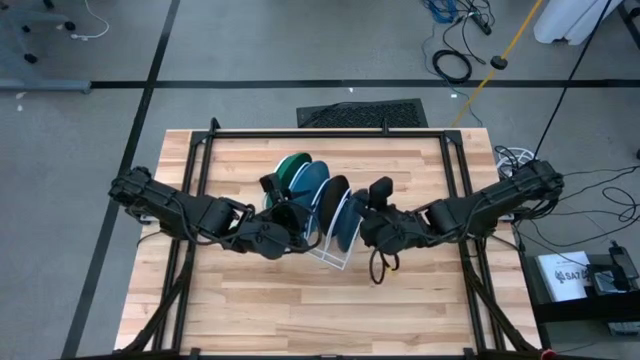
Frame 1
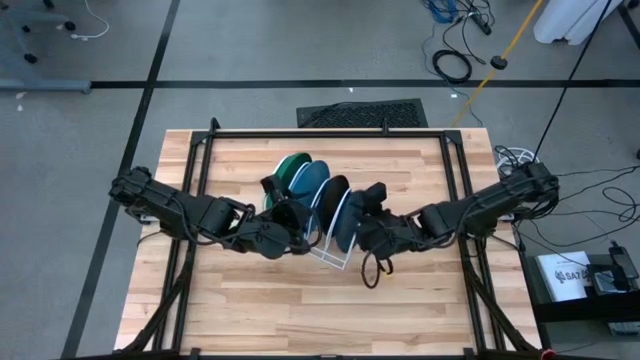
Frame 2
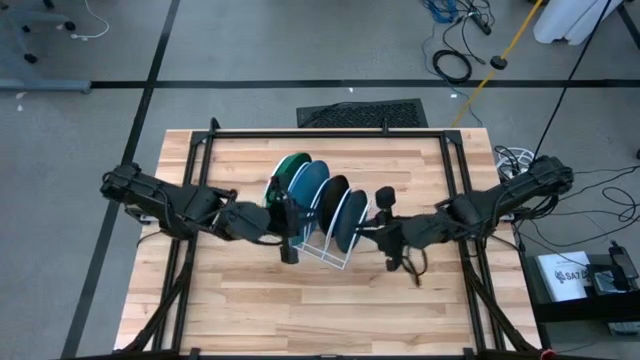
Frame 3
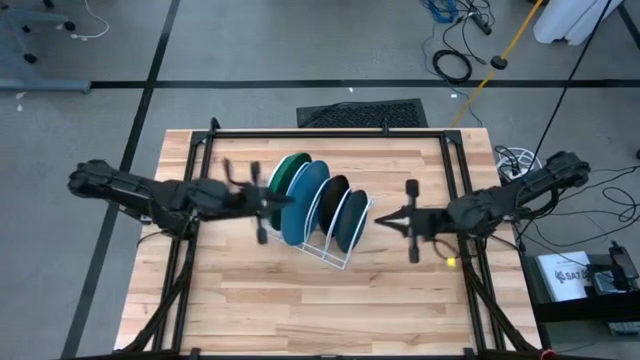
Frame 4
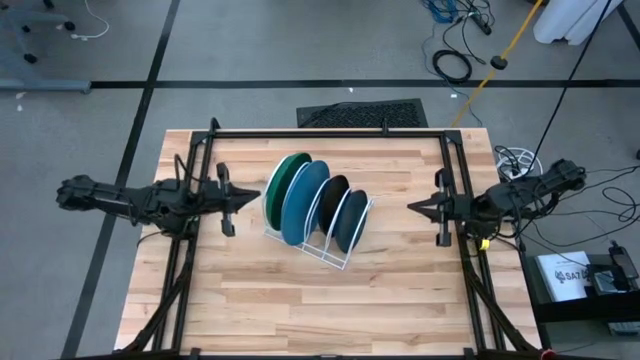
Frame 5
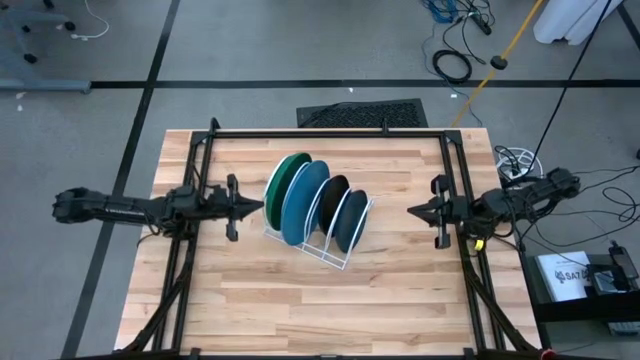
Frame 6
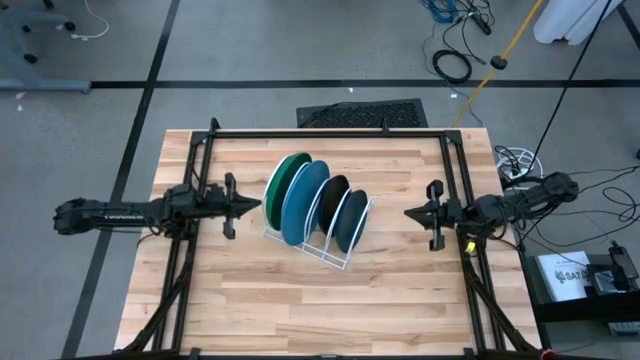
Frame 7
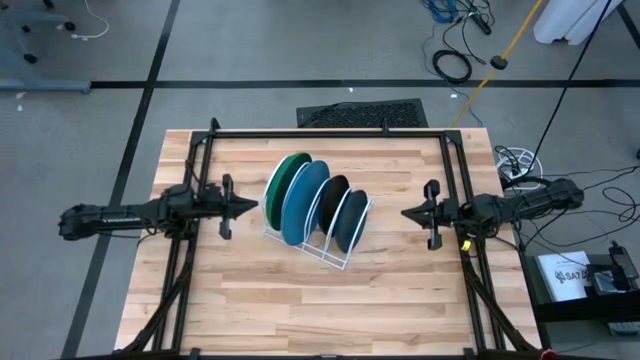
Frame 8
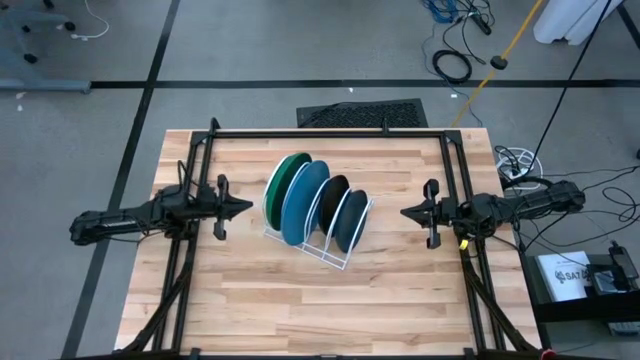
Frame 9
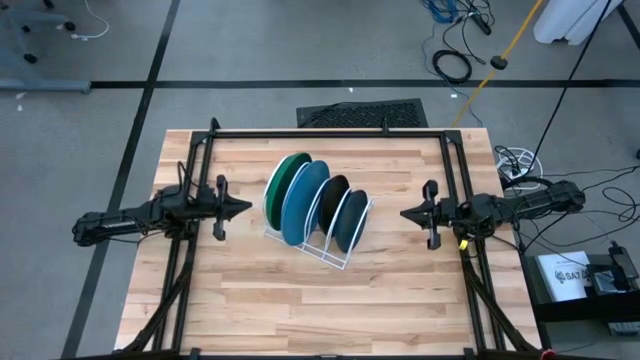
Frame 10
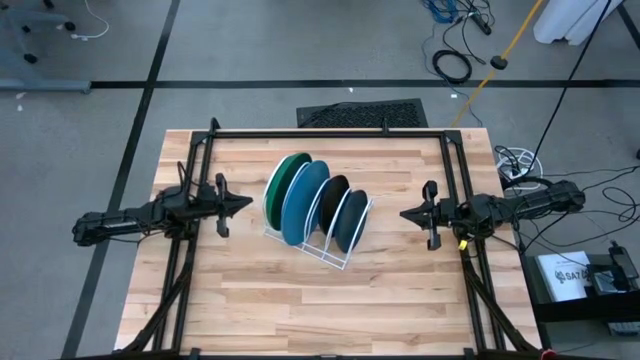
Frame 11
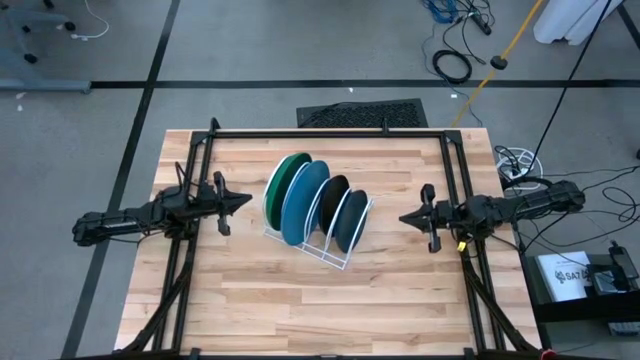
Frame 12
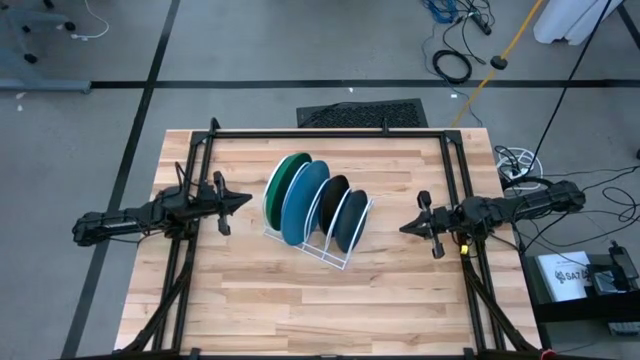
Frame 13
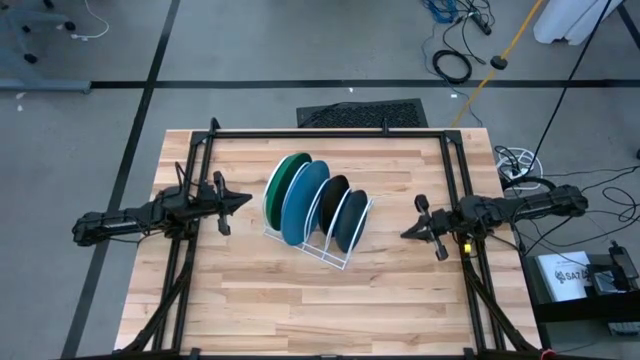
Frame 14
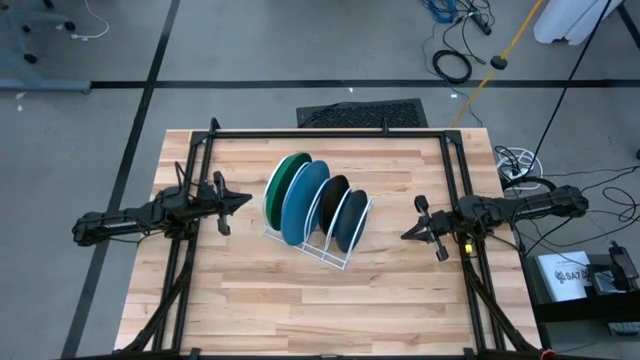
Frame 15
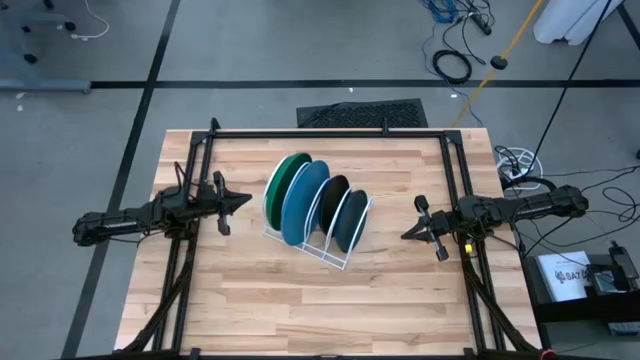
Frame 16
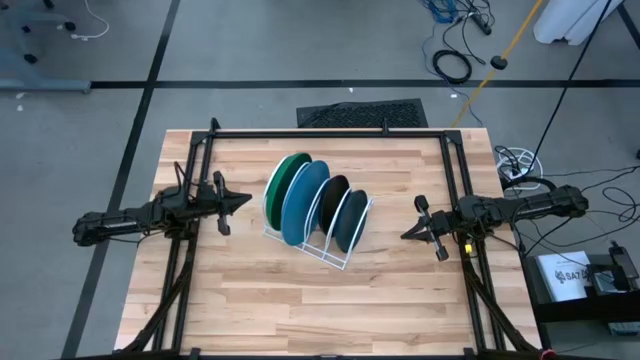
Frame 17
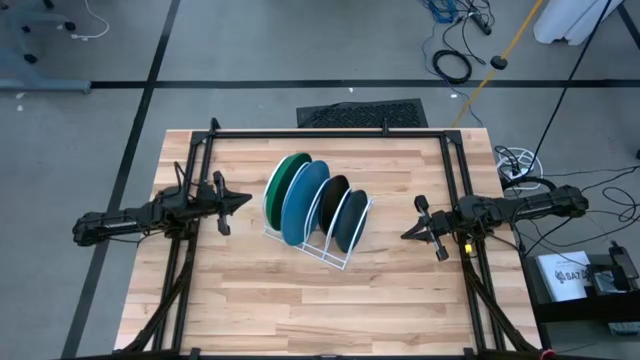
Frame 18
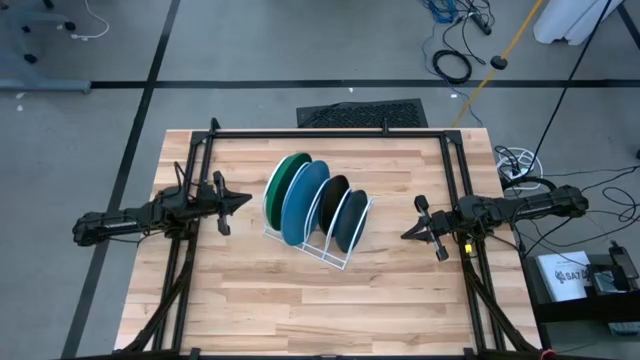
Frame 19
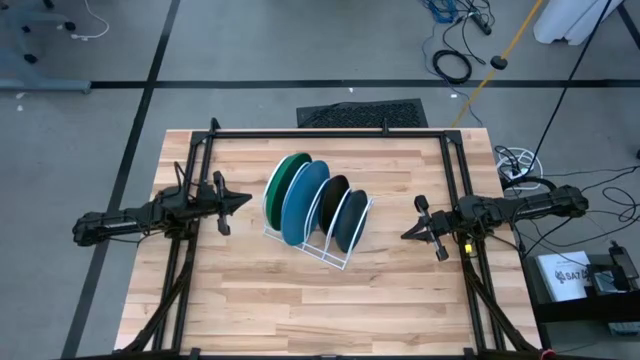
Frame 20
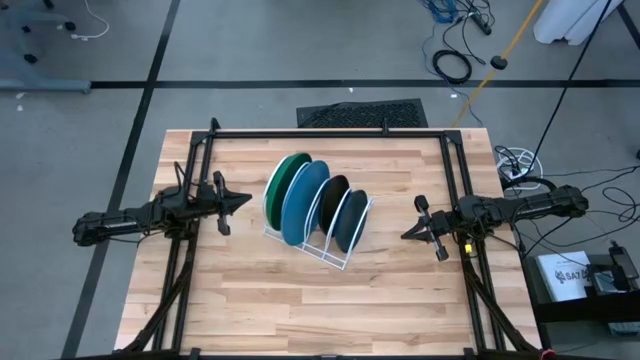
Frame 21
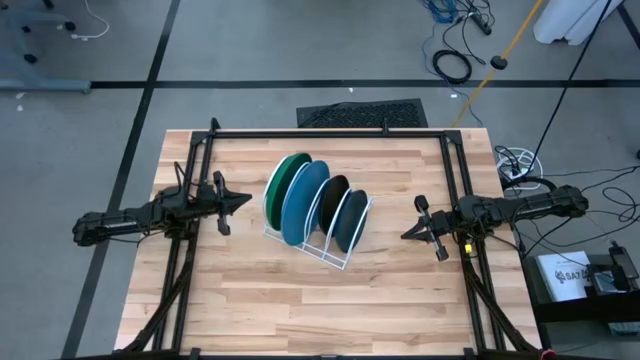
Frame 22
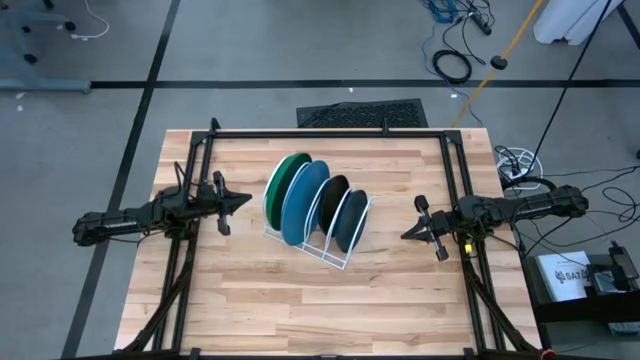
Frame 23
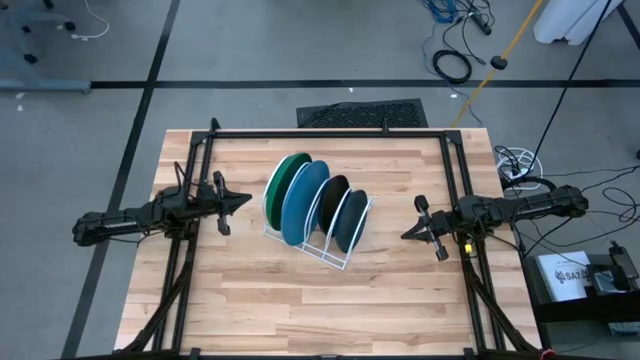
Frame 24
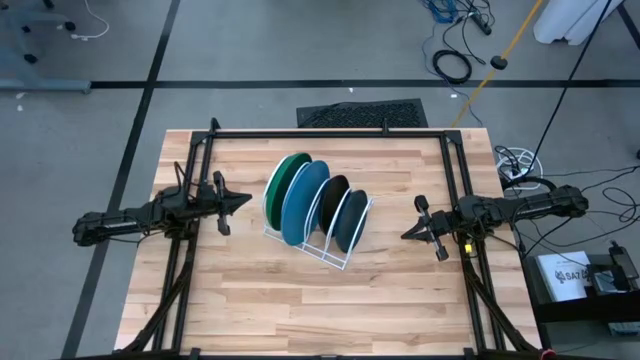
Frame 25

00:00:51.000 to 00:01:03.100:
Task: Sort dishes
Return to Home Position

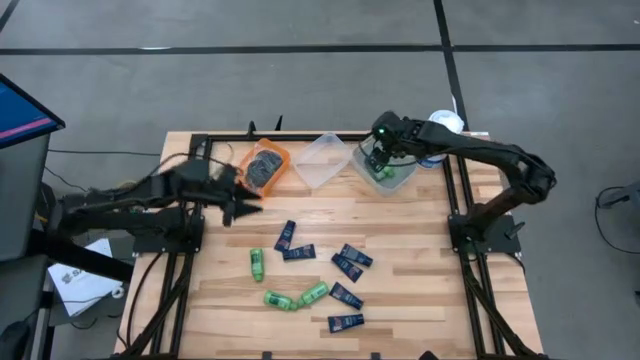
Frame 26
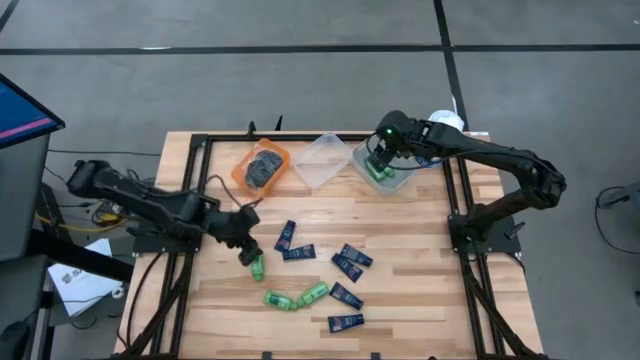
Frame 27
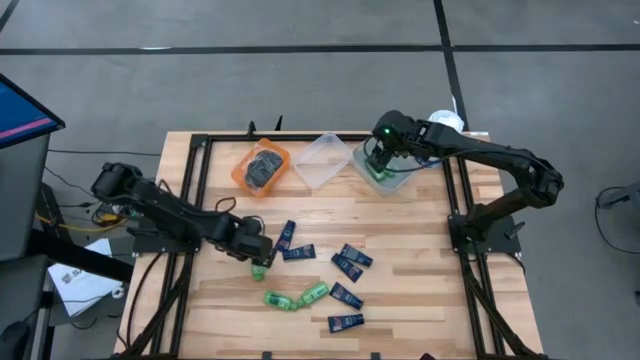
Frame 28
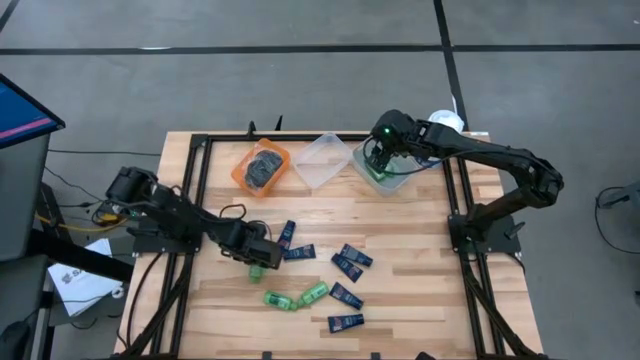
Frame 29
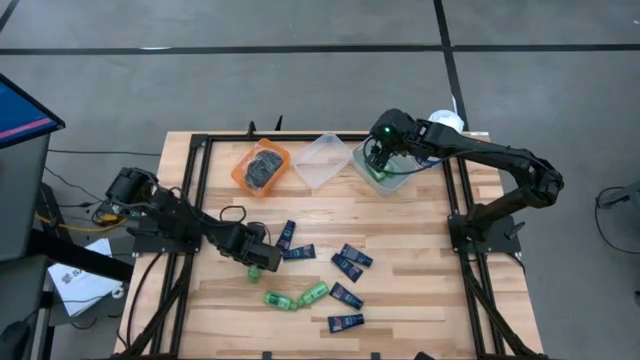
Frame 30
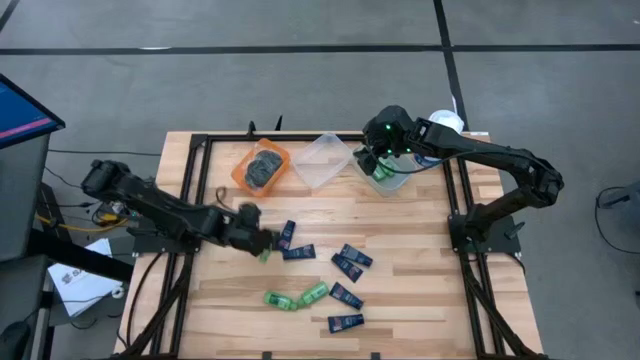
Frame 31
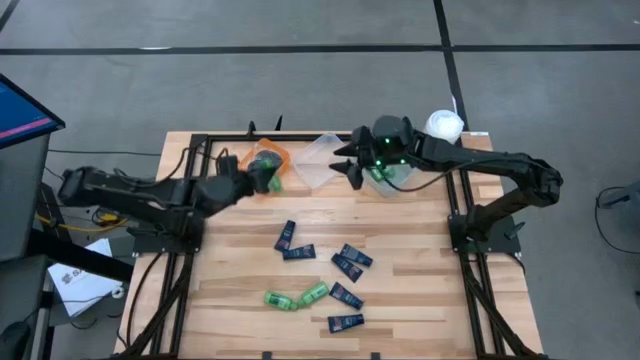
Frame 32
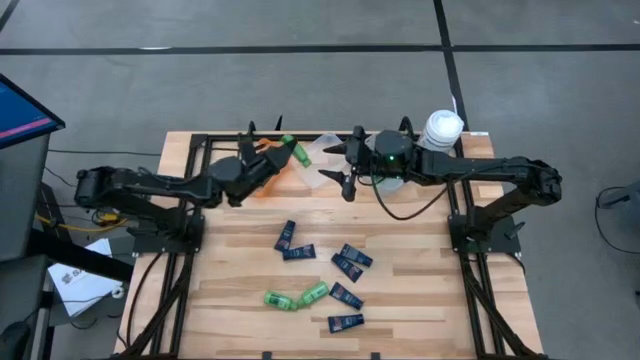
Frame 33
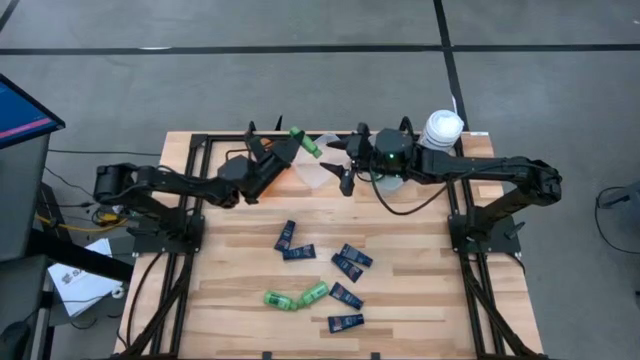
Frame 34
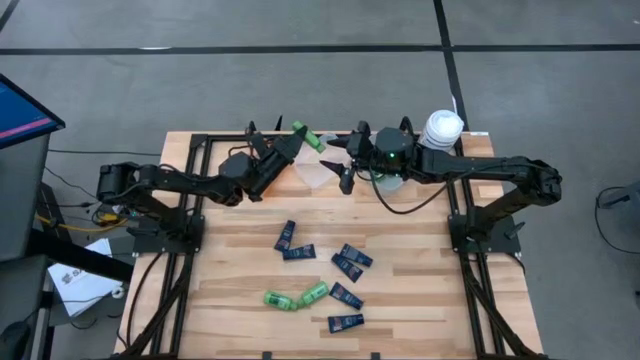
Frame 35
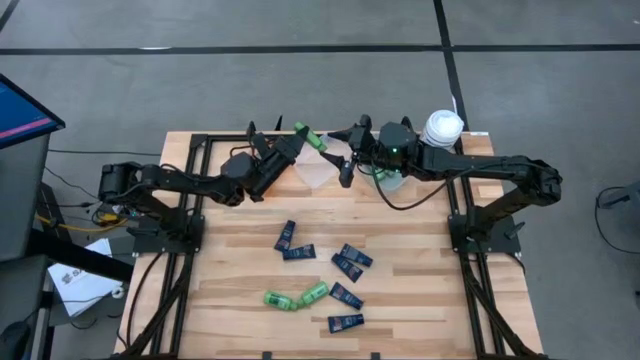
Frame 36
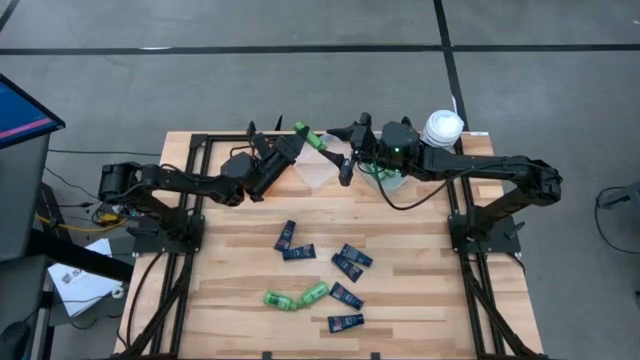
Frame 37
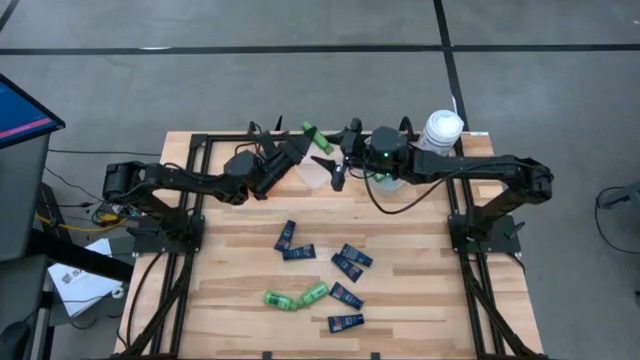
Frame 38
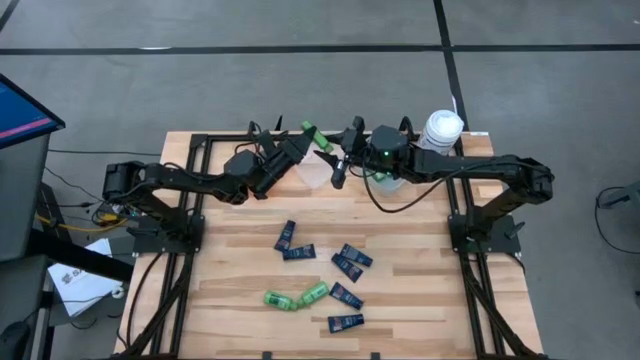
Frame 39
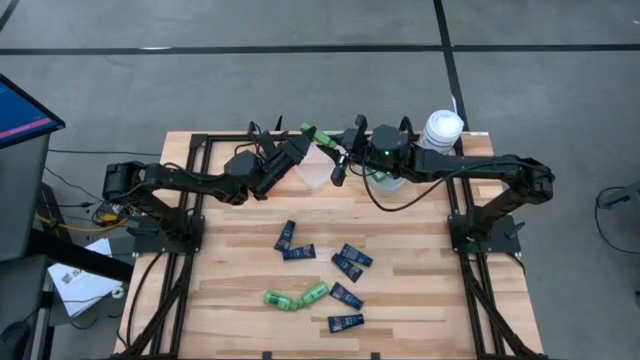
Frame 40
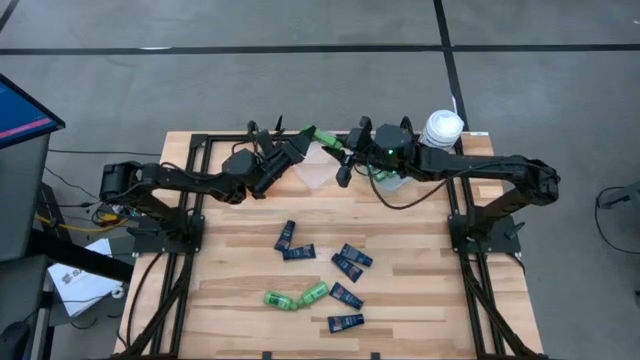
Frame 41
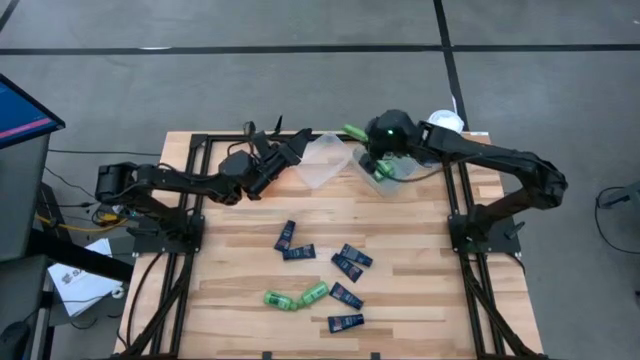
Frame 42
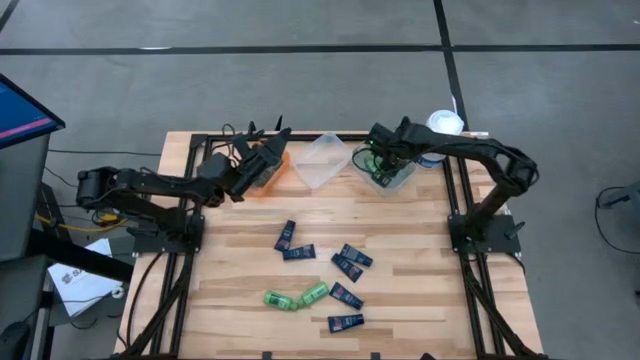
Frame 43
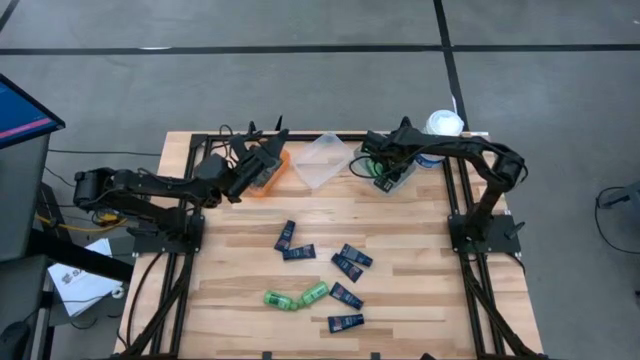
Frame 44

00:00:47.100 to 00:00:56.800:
Task: Pick & Place Travel size toiletries
Put the green shampoo into the gray bin
